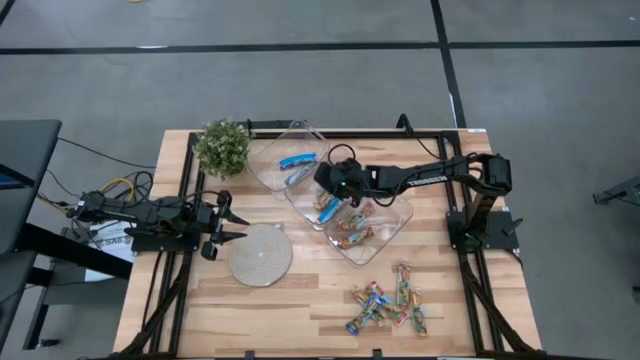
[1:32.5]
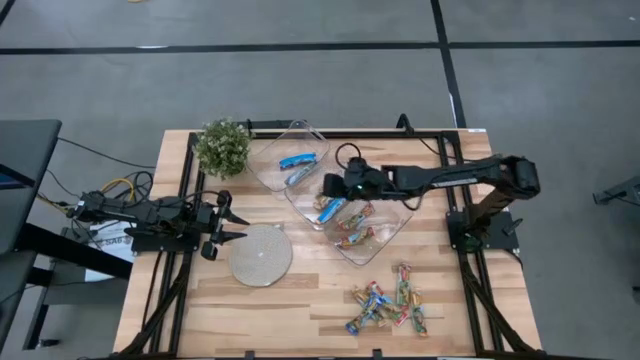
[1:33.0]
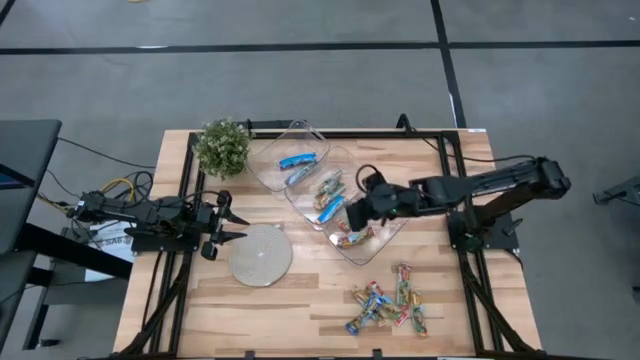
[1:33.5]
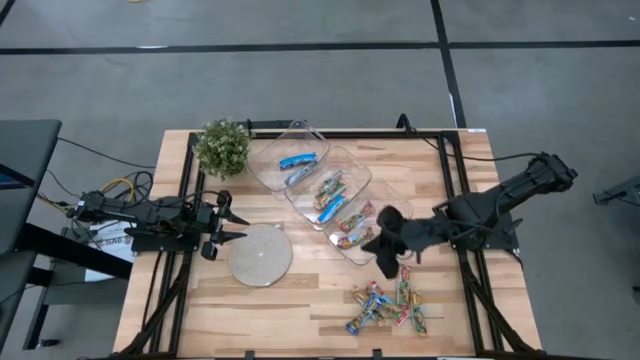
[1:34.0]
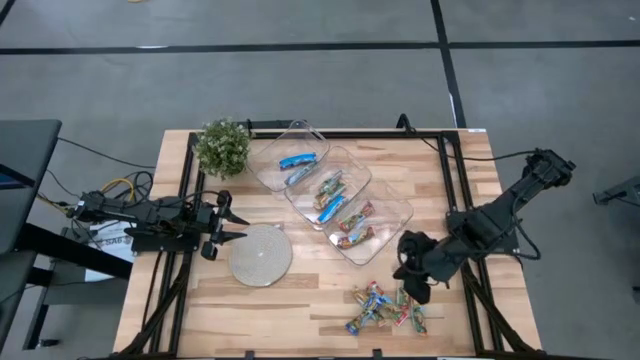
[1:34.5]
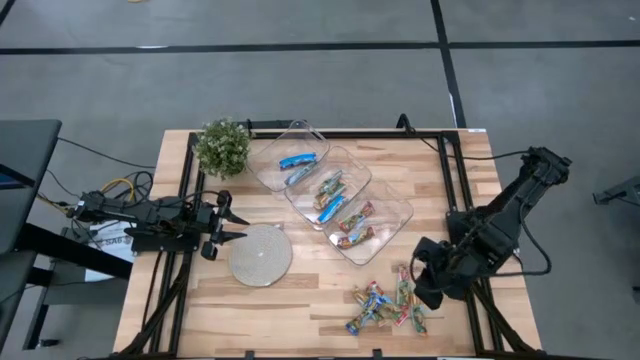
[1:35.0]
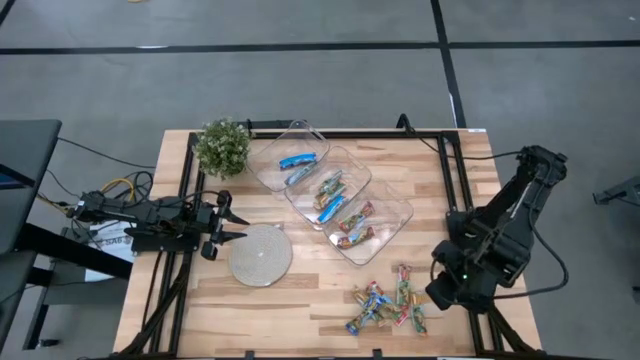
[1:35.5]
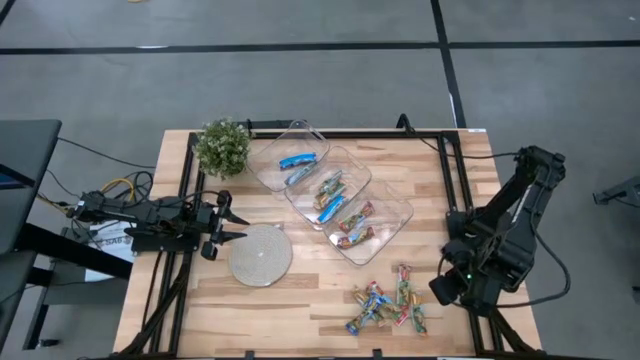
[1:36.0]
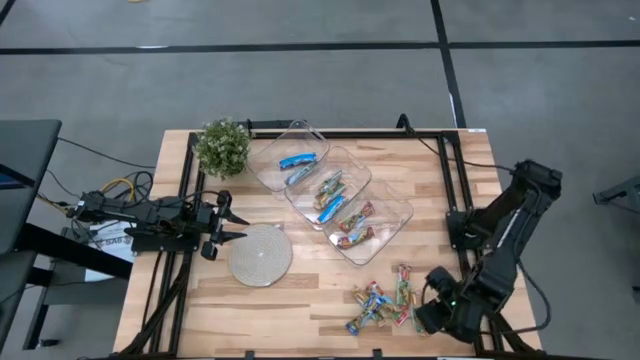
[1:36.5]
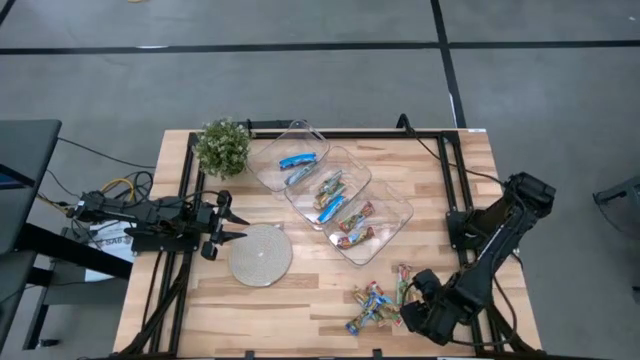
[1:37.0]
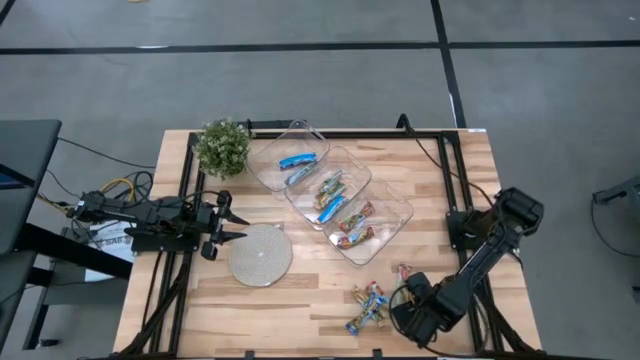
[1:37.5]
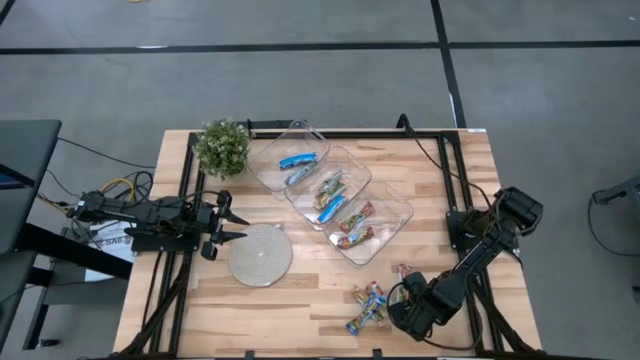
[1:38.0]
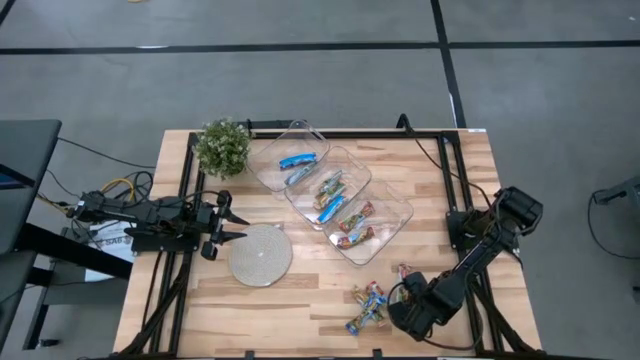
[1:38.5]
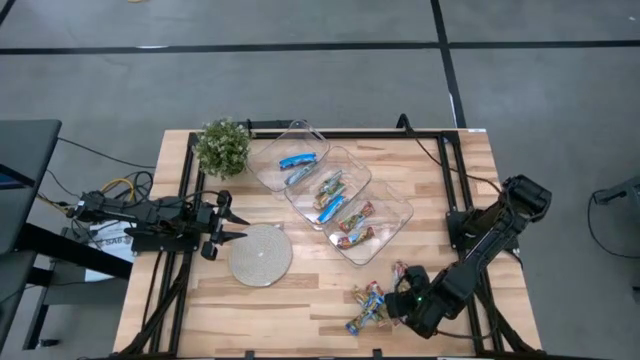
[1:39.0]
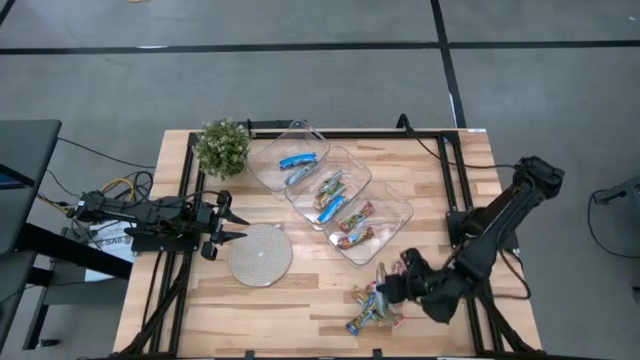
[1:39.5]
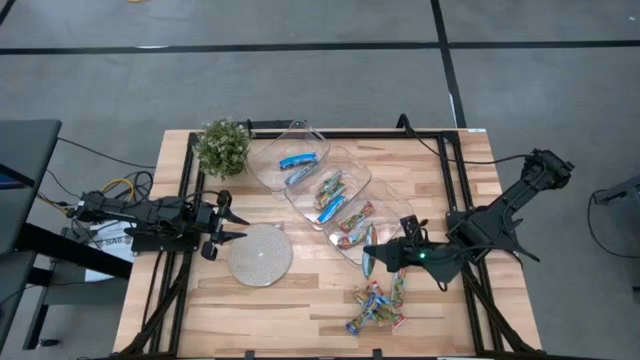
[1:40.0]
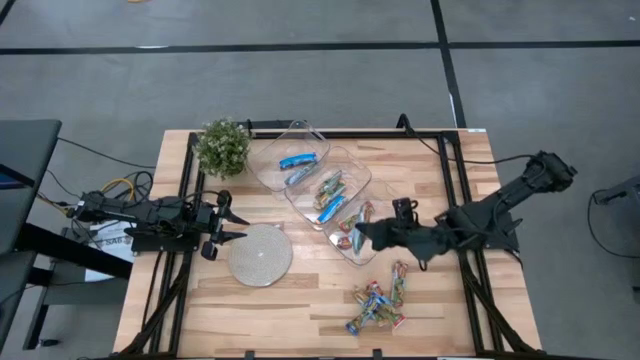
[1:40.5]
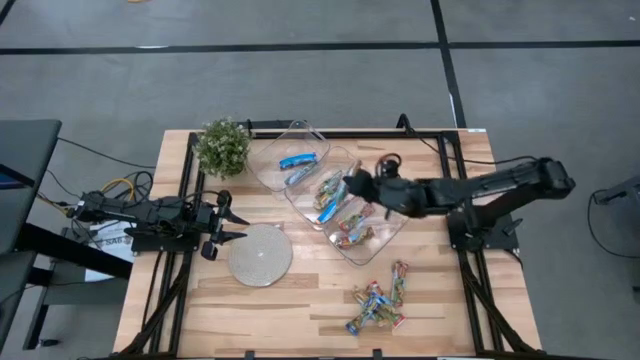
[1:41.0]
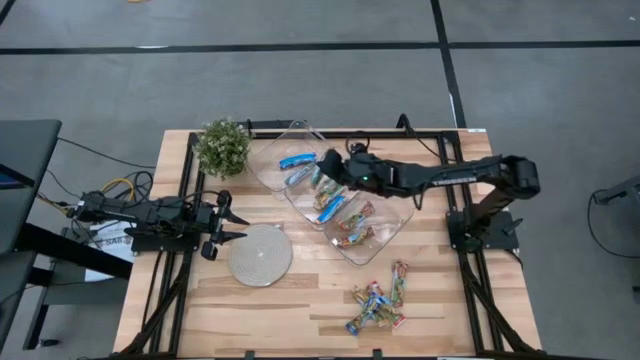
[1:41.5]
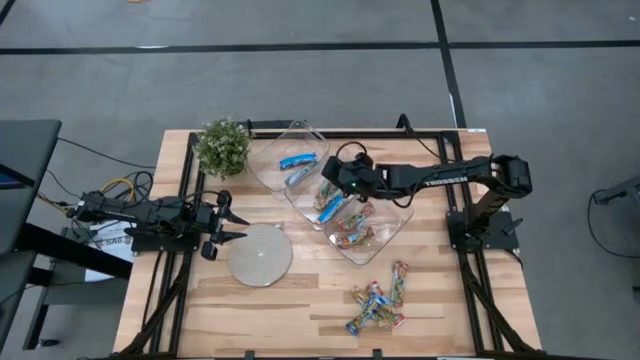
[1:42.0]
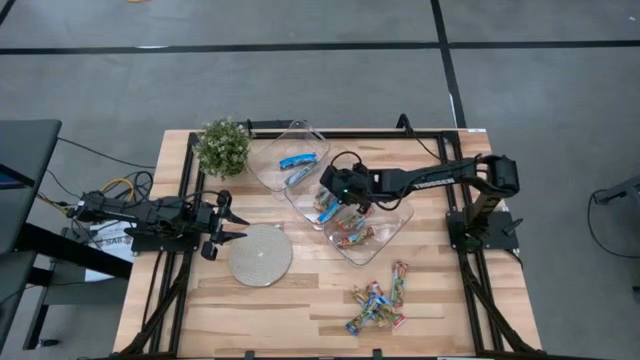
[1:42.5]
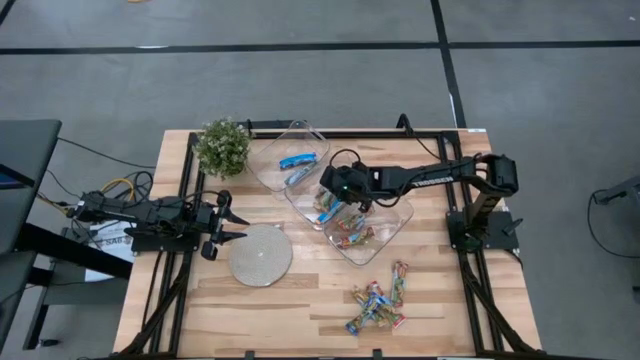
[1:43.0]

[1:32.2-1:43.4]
Task: Pick and place Granola Bars by type
Put the yellow granola bar into the middle transparent bin

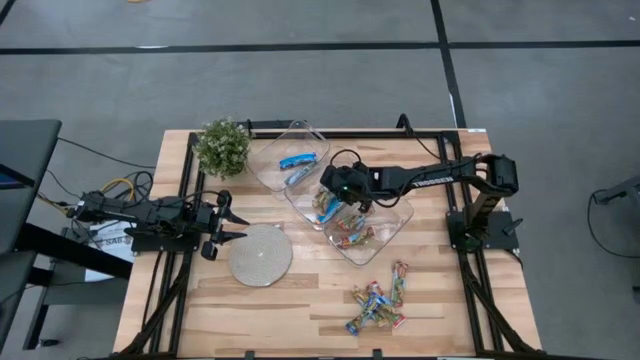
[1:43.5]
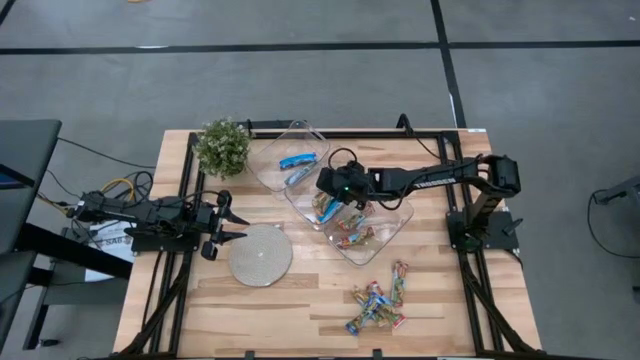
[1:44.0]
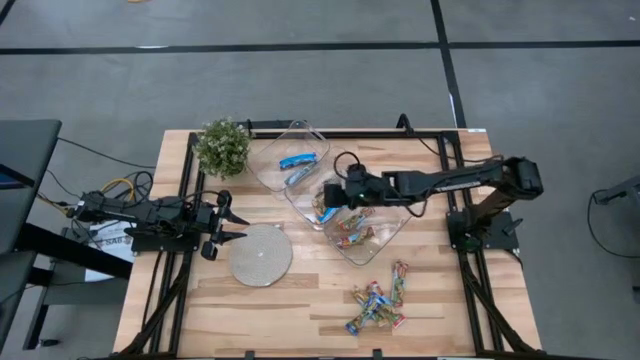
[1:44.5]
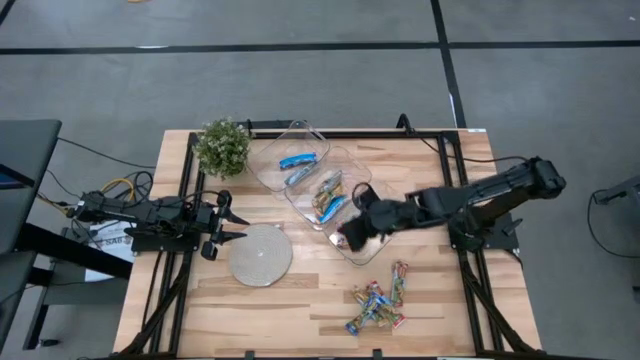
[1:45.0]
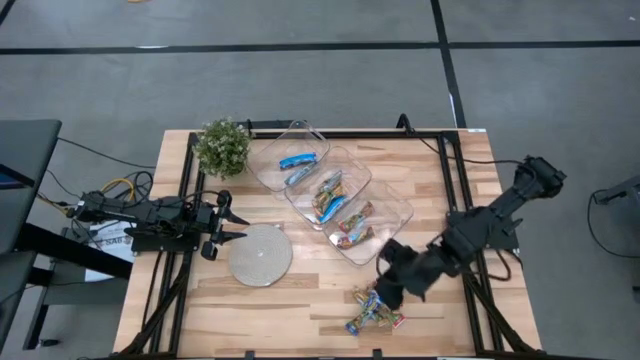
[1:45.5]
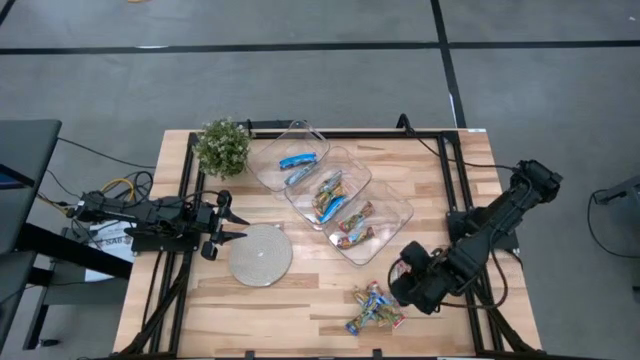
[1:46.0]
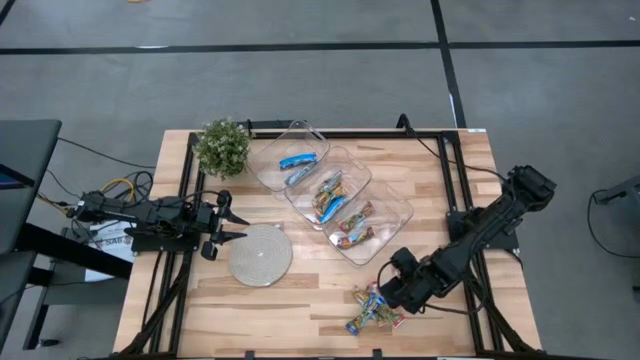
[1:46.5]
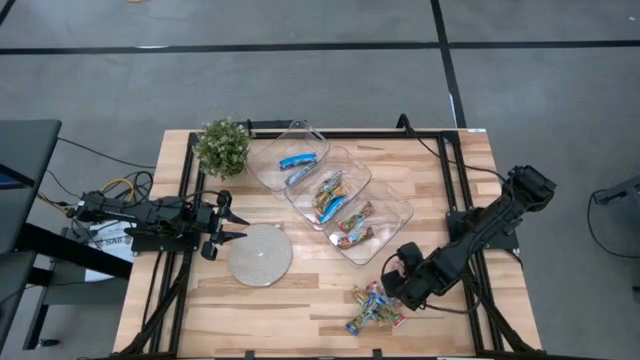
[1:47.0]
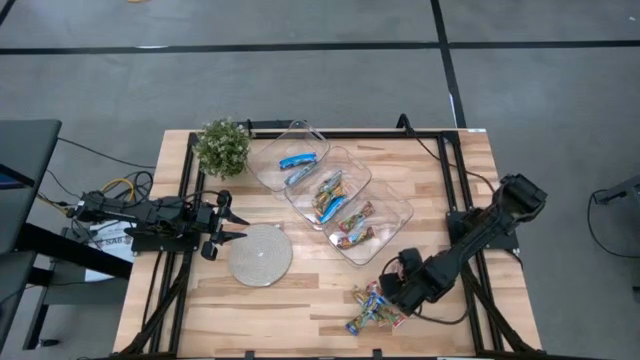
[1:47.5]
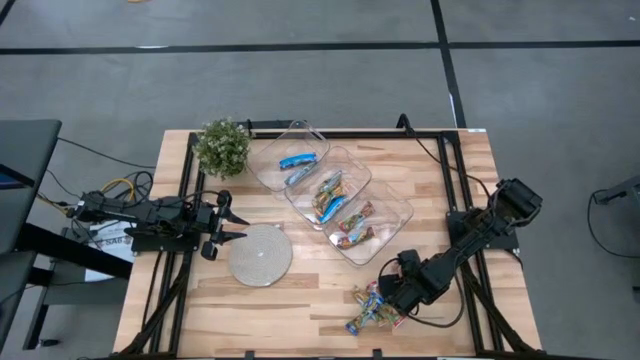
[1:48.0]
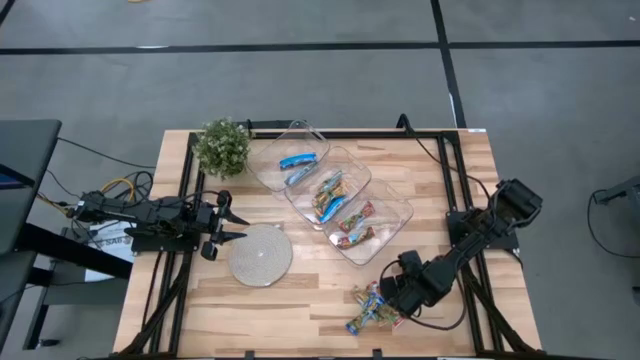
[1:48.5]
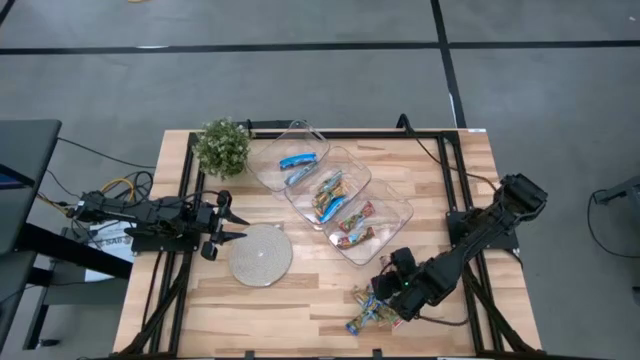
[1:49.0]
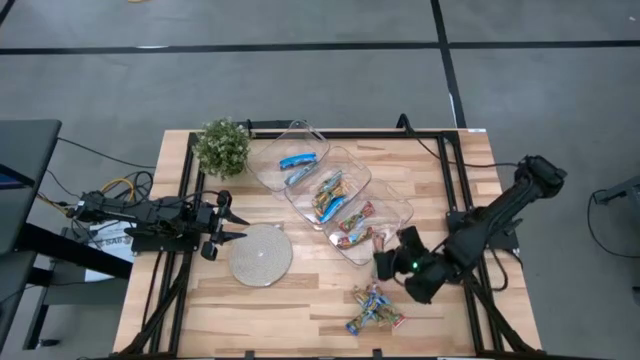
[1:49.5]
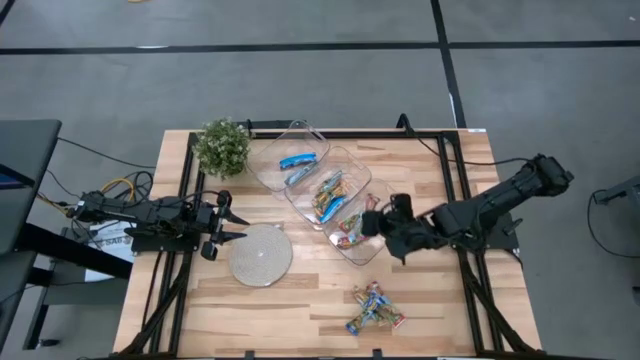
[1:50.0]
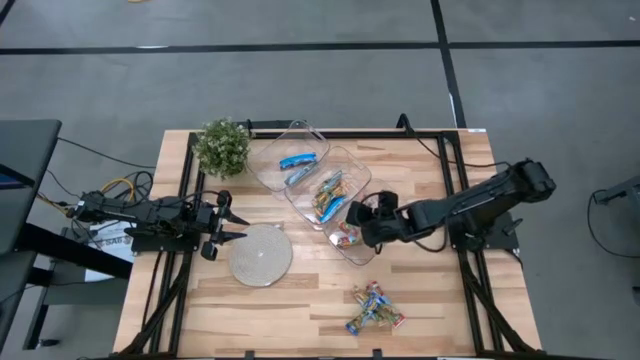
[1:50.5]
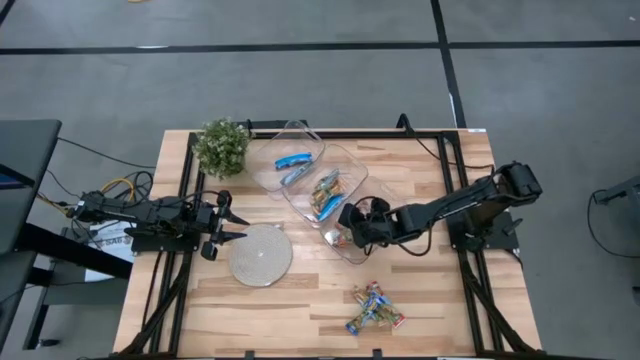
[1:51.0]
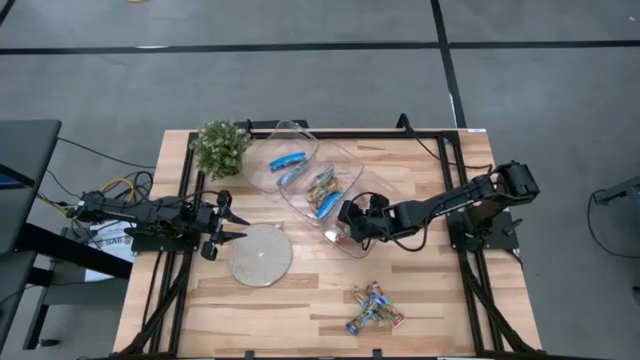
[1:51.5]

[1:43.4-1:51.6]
Put the red granola bar into the bottom transparent bin

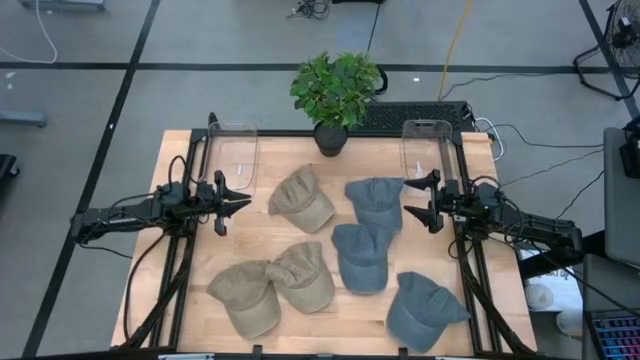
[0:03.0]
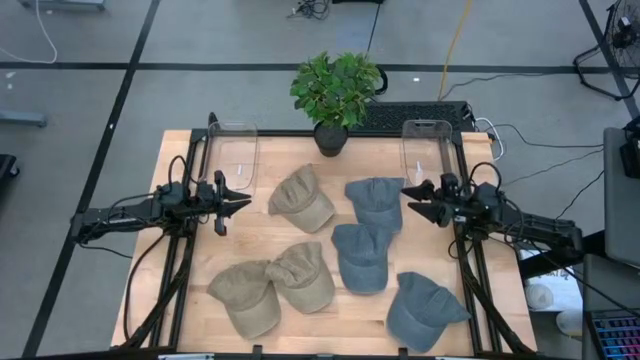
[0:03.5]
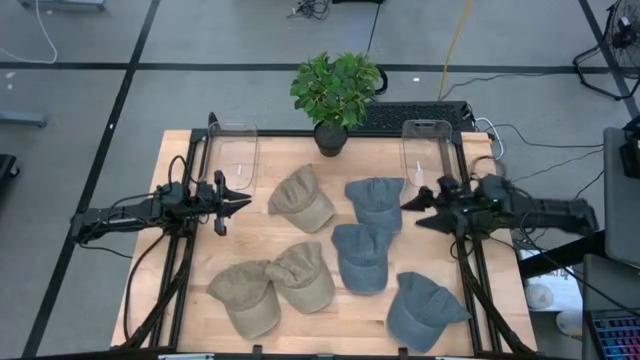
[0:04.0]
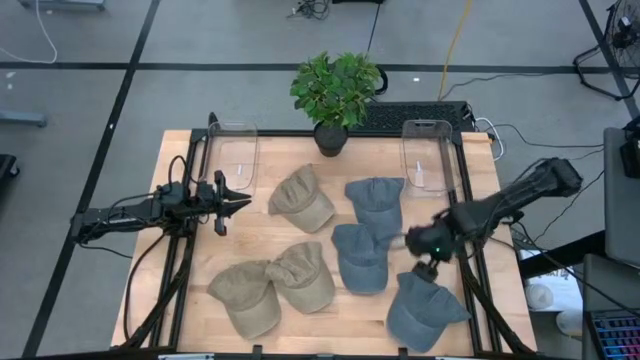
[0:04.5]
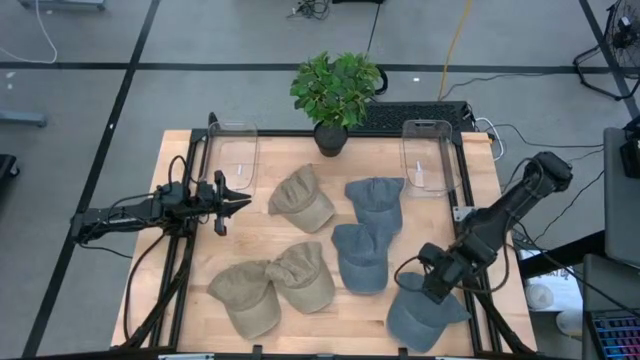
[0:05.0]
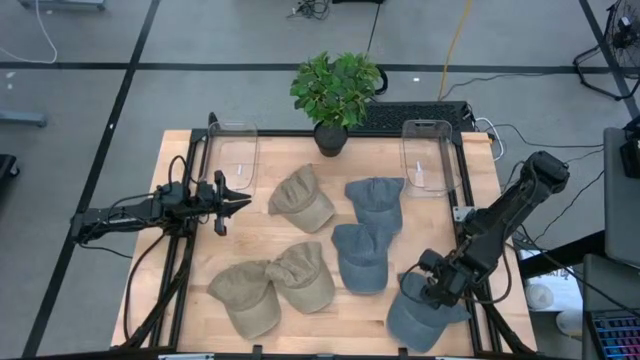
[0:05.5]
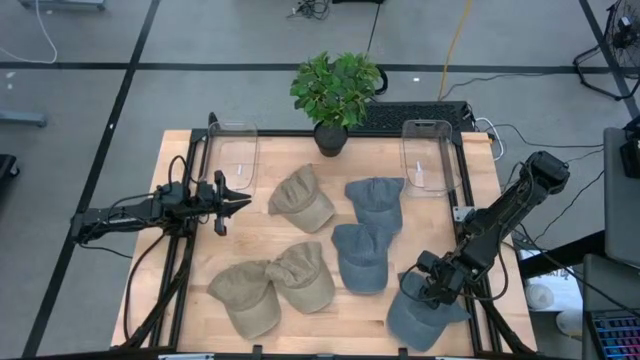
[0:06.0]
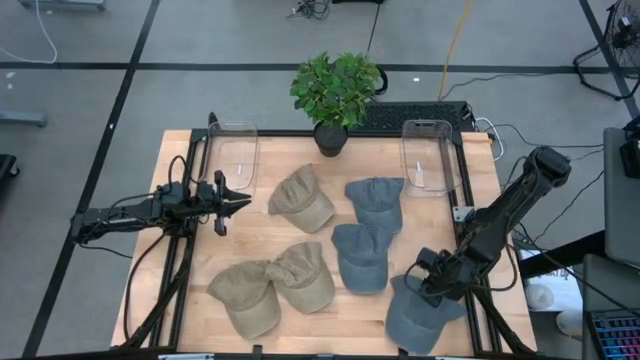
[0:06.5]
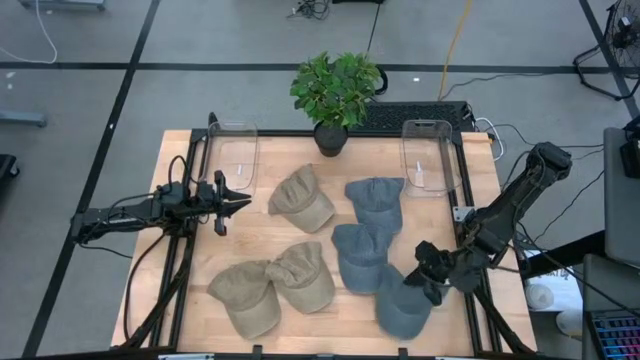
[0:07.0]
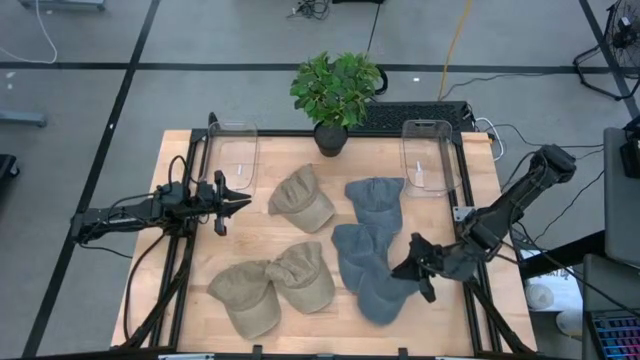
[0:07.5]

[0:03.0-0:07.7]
Task: Pick & Place hat
Put the bottom blue cap into the right transparent bin
